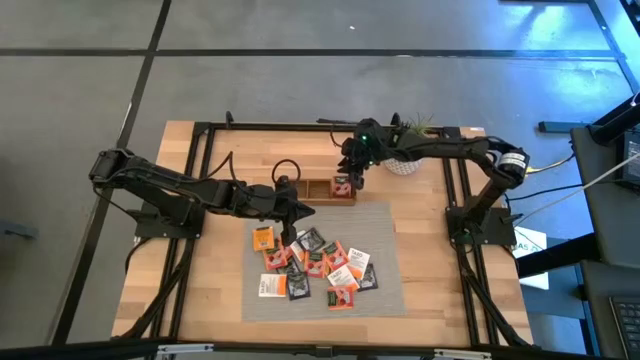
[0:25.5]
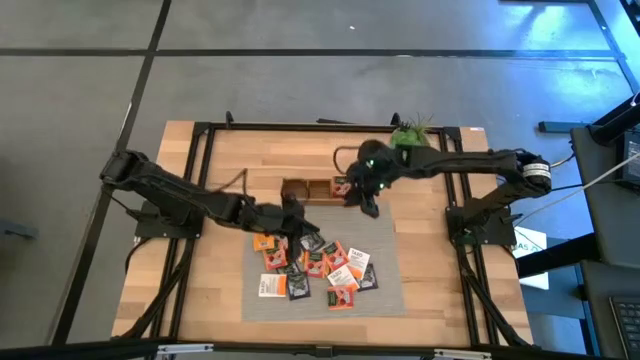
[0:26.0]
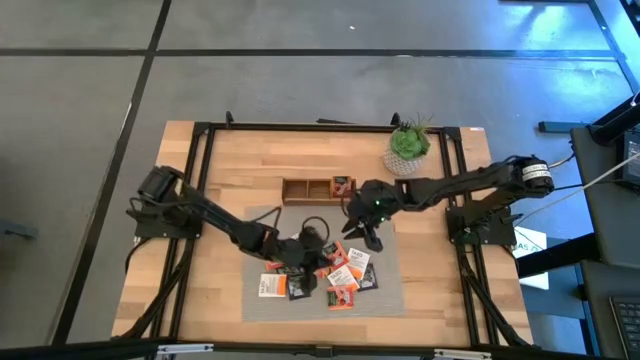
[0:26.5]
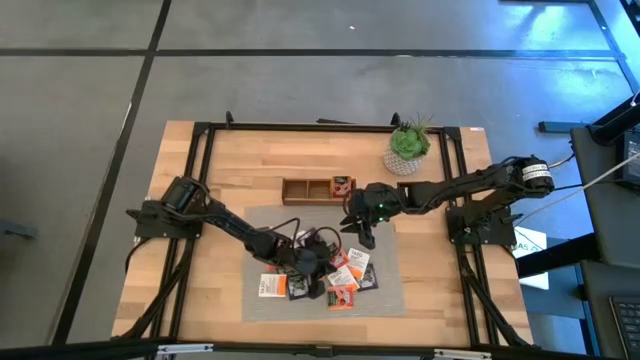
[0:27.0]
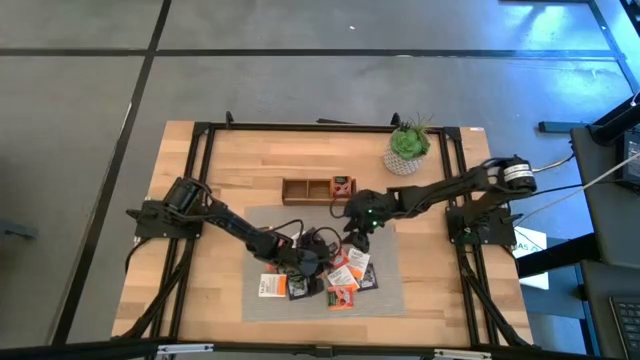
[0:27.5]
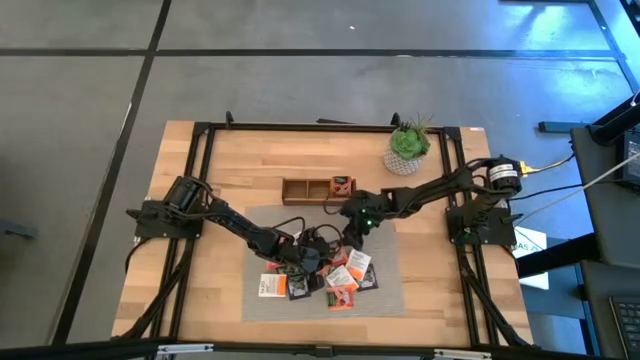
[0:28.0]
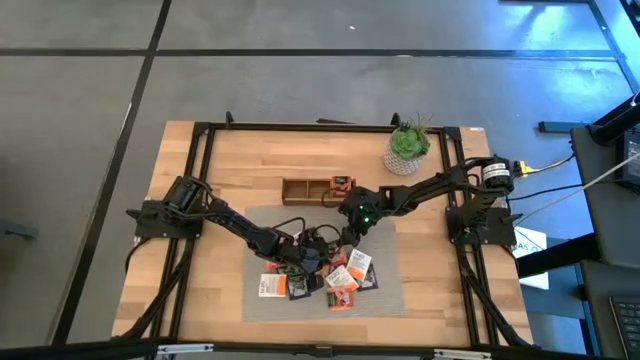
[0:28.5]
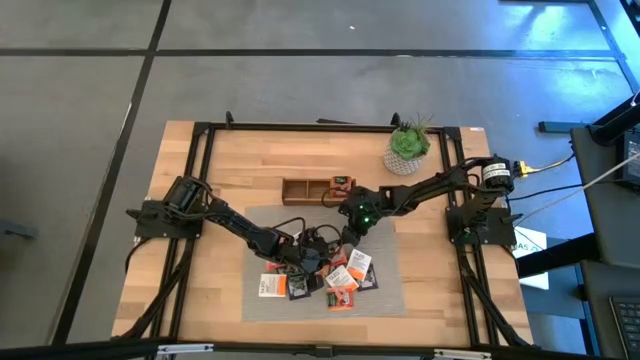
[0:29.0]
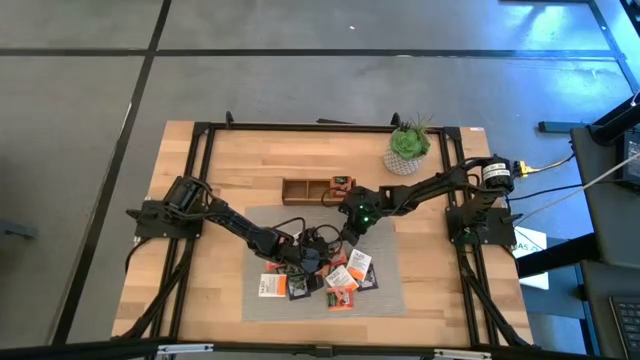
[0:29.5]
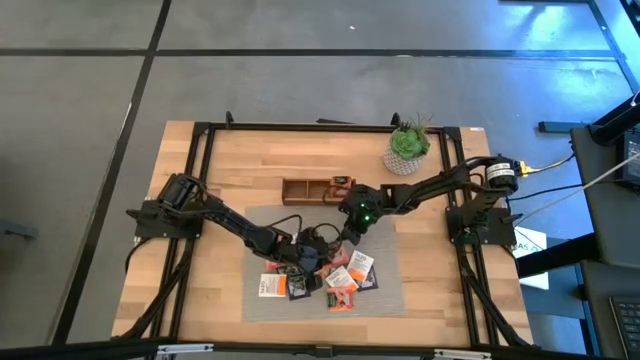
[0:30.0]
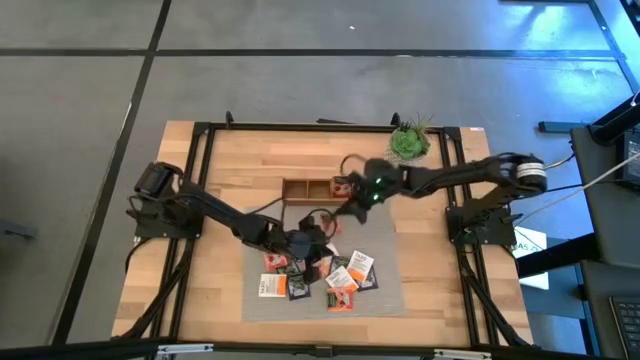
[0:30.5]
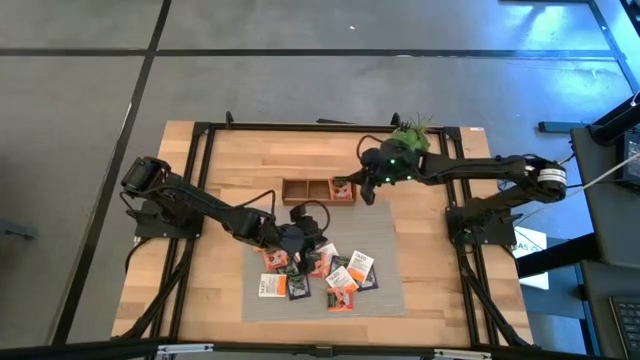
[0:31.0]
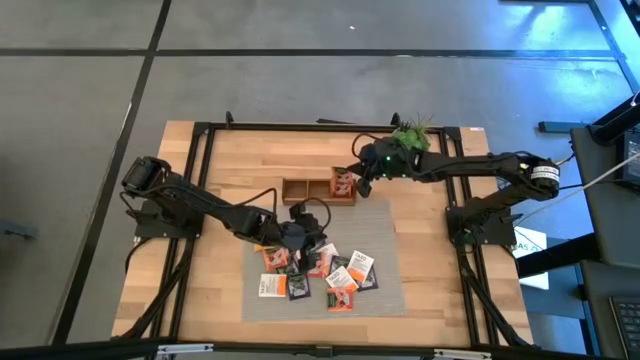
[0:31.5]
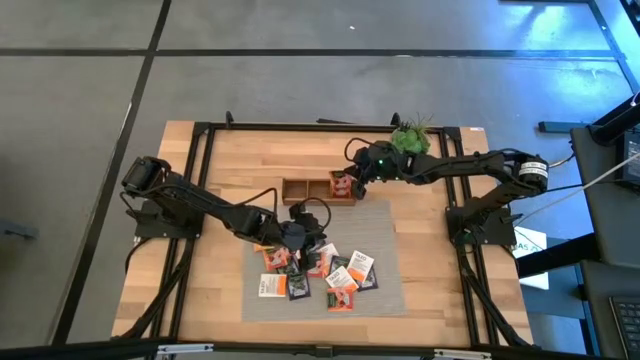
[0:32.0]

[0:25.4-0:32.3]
Task: Pick & Place Tea
Put the orange tea bag into the right section of the wooden organizer

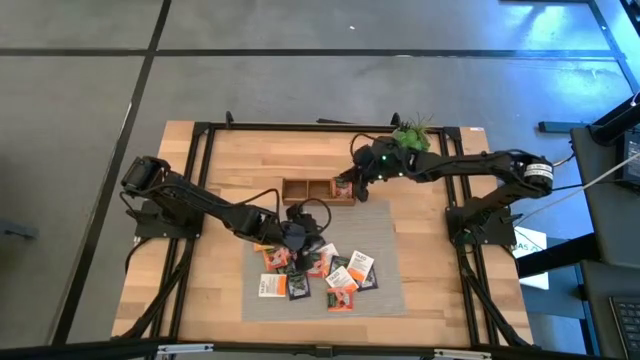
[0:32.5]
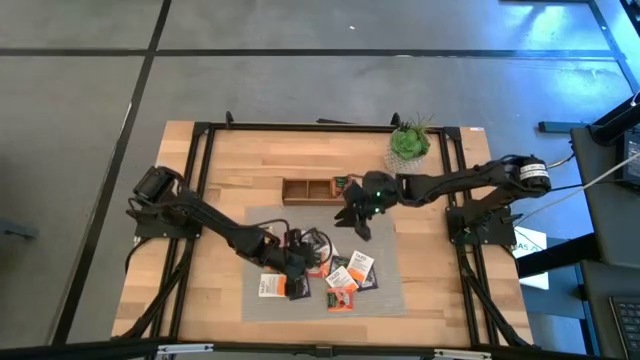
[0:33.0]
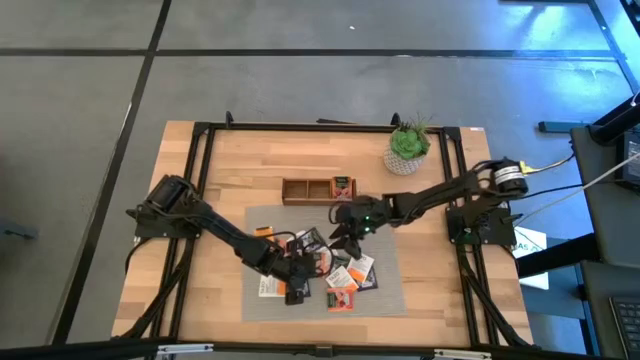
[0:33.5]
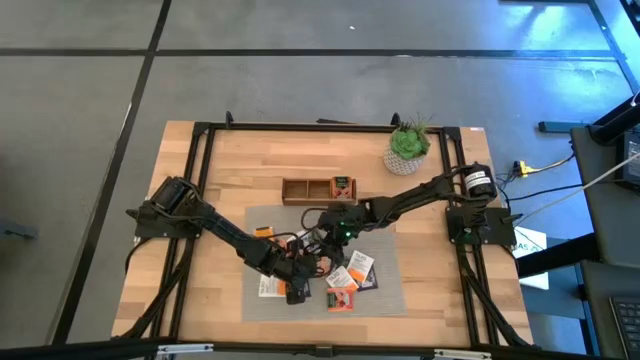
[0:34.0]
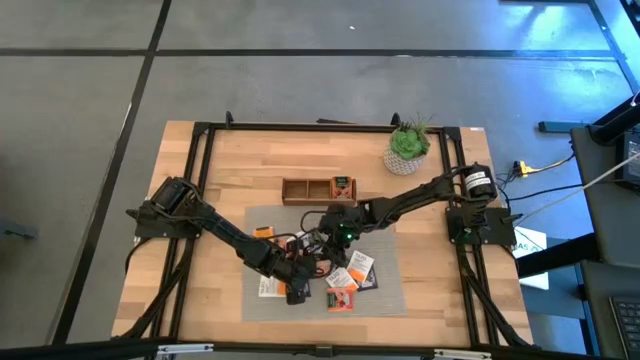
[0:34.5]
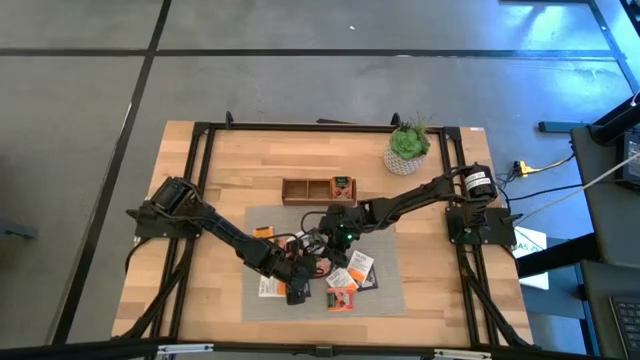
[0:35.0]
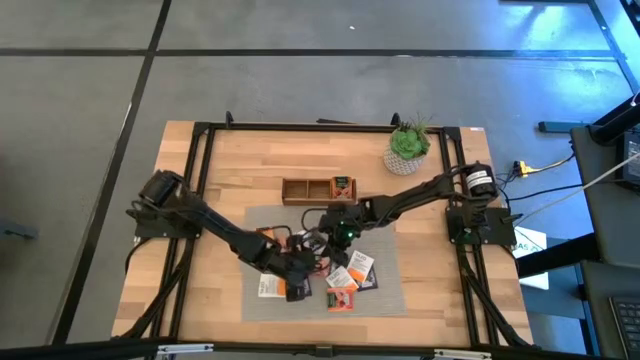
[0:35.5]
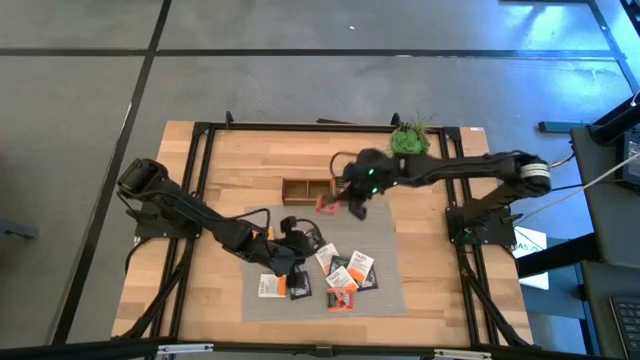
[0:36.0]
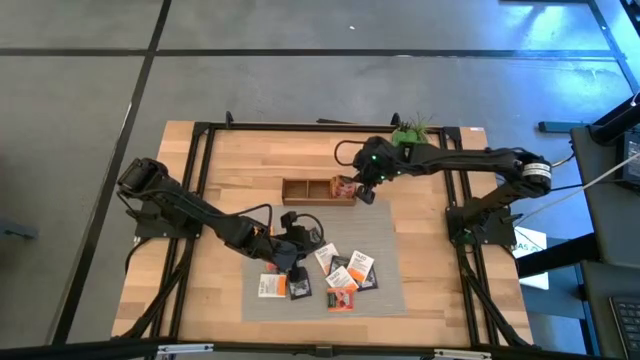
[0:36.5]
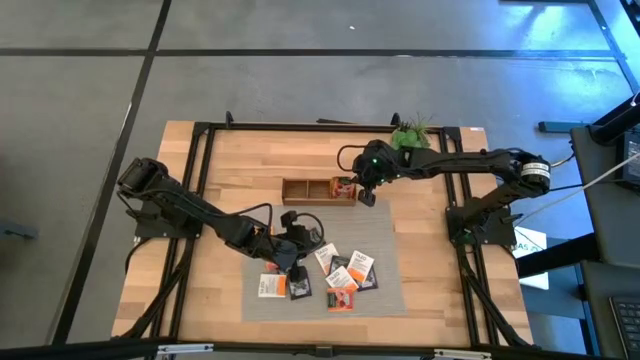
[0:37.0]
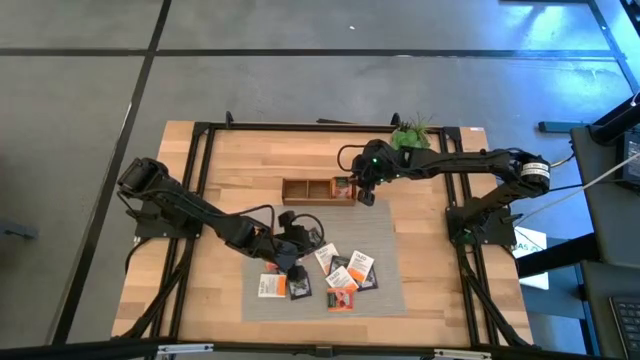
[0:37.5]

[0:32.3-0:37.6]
Put the orange tea bag into the right section of the wooden organizer

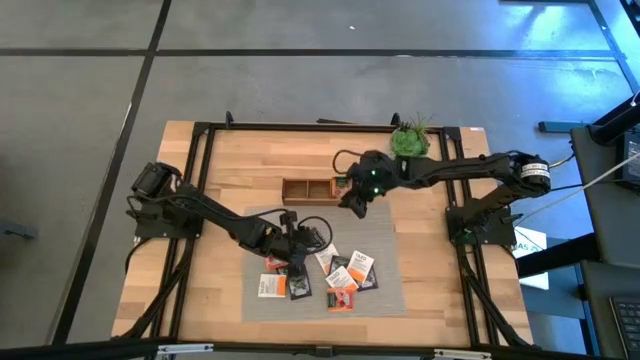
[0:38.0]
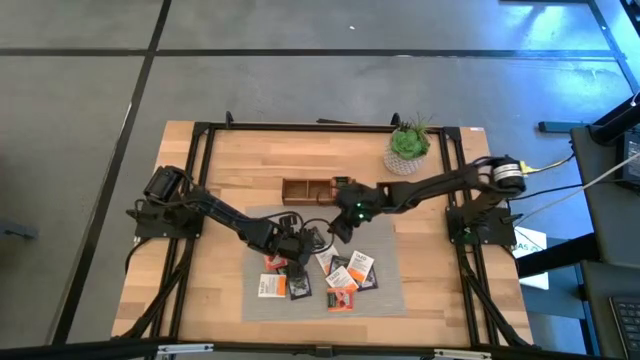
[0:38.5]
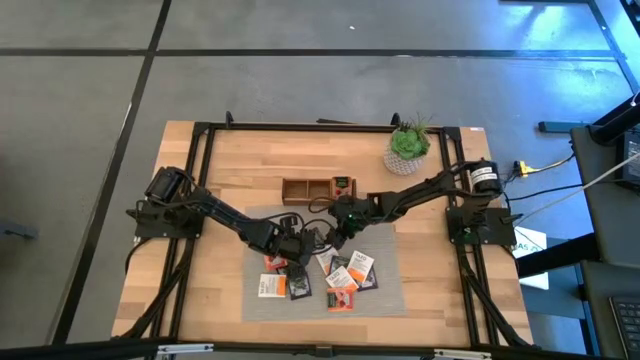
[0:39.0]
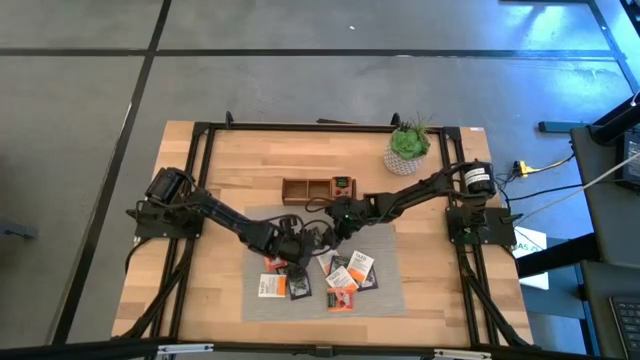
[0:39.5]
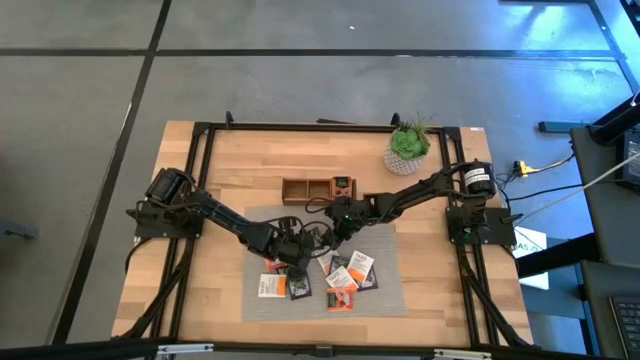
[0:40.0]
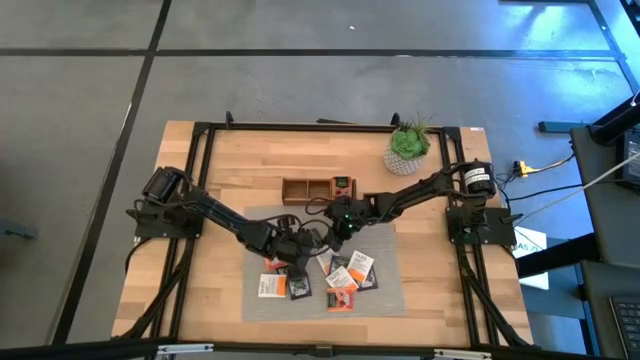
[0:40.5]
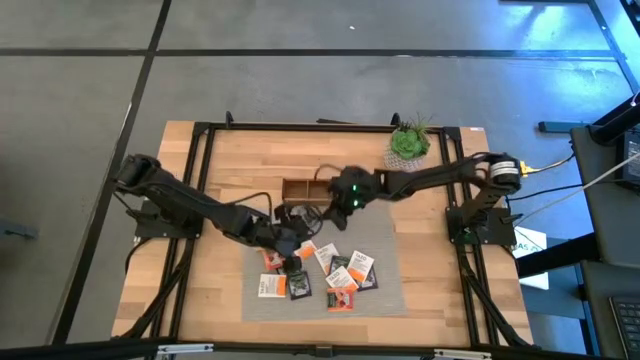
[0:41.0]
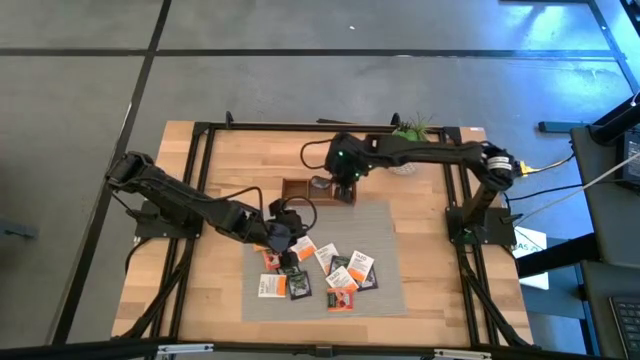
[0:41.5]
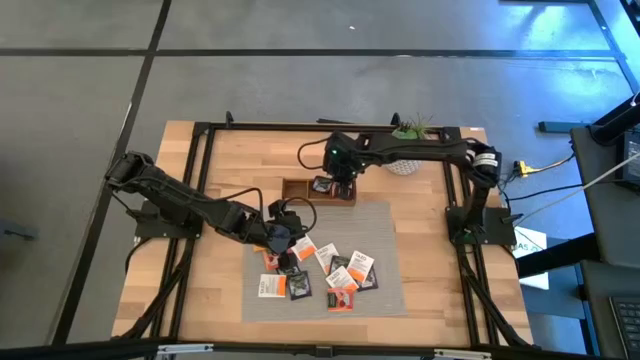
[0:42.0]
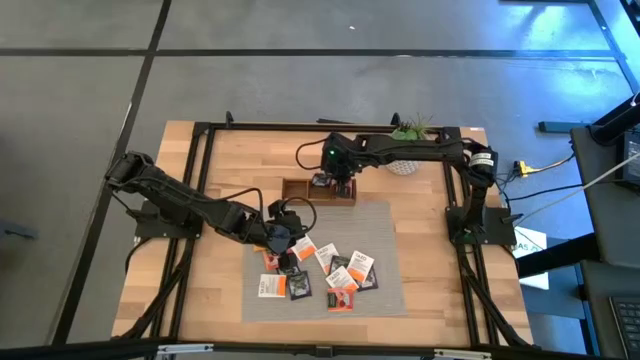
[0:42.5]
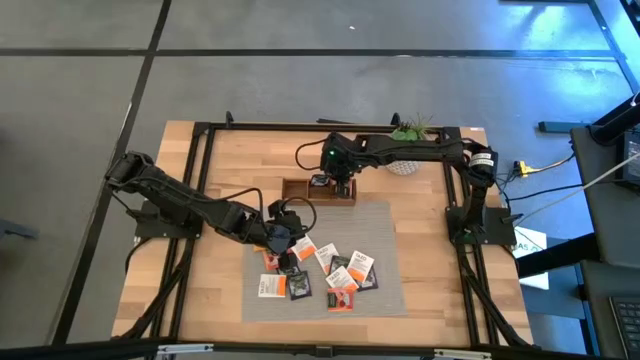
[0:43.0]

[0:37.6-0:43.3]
Put the blue tea bag into the middle section of the wooden organizer
